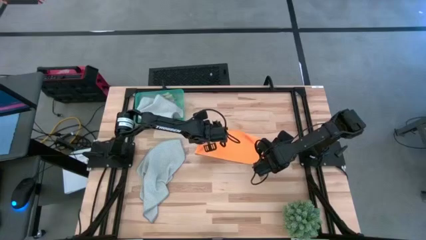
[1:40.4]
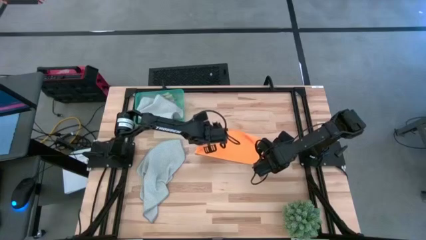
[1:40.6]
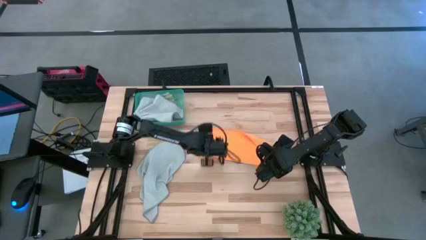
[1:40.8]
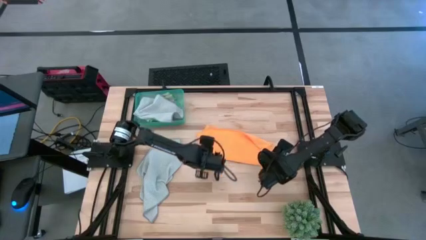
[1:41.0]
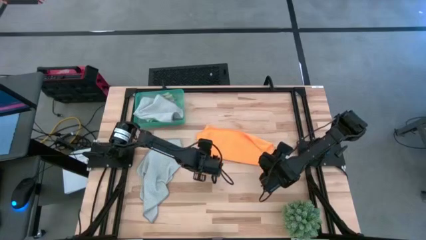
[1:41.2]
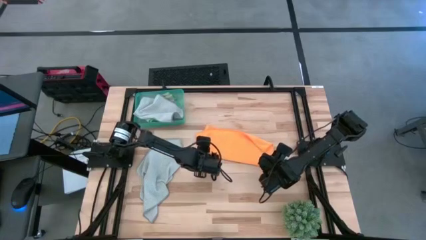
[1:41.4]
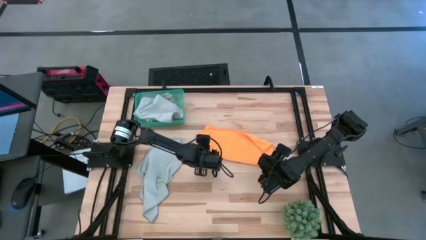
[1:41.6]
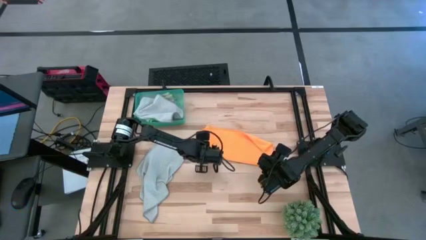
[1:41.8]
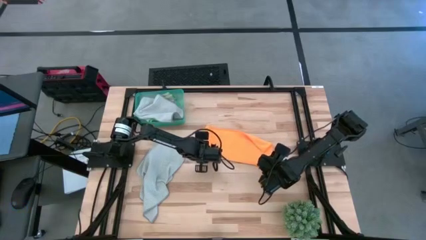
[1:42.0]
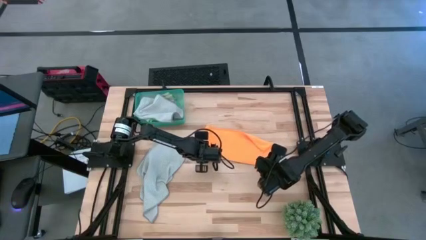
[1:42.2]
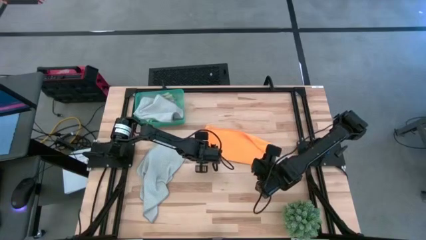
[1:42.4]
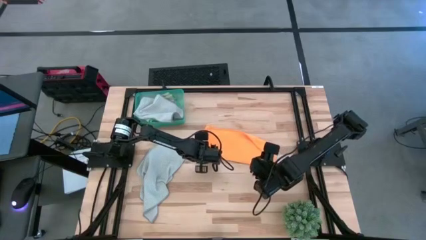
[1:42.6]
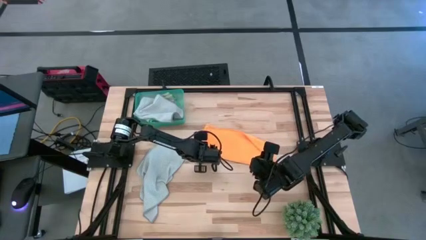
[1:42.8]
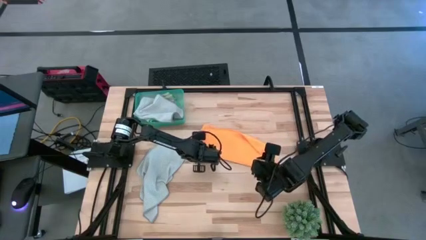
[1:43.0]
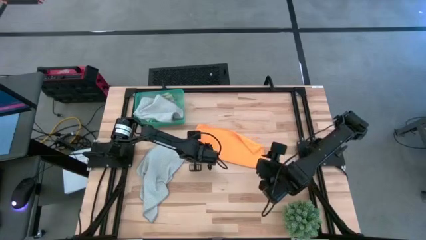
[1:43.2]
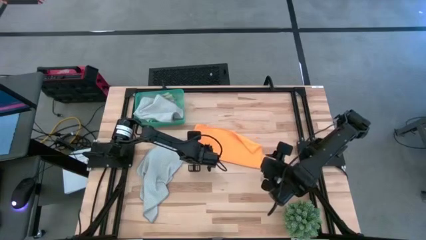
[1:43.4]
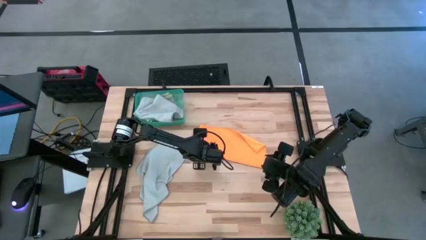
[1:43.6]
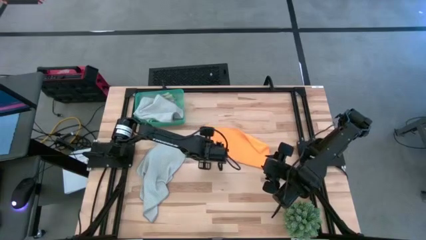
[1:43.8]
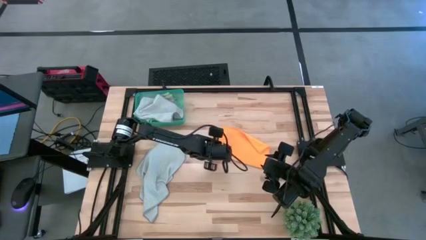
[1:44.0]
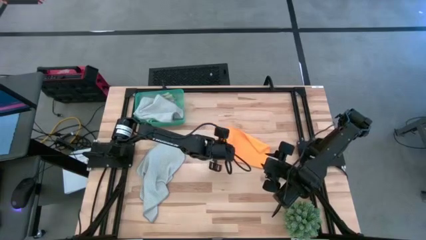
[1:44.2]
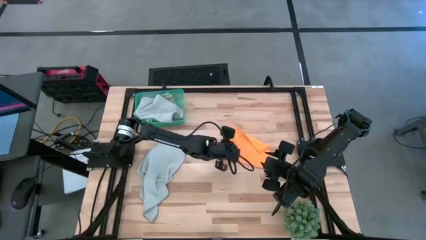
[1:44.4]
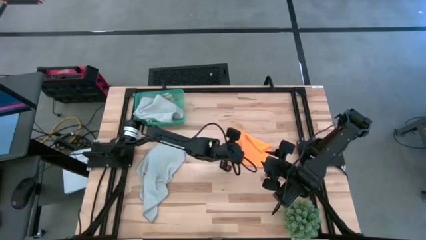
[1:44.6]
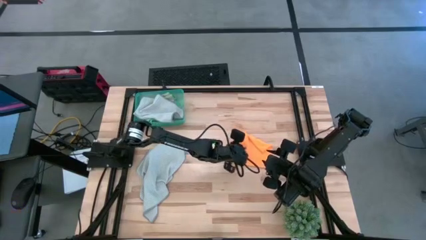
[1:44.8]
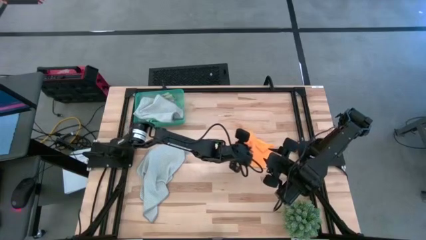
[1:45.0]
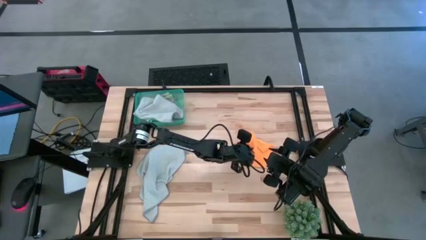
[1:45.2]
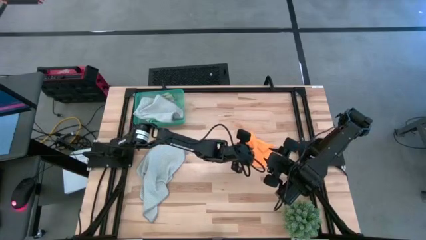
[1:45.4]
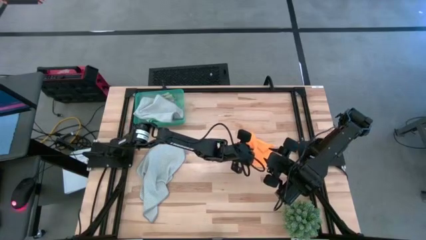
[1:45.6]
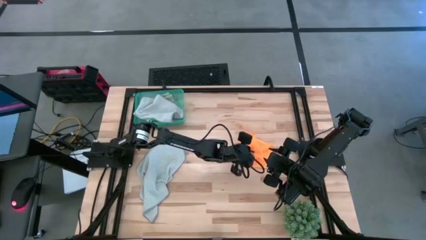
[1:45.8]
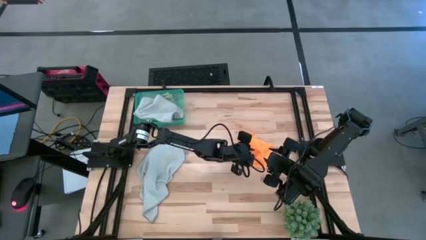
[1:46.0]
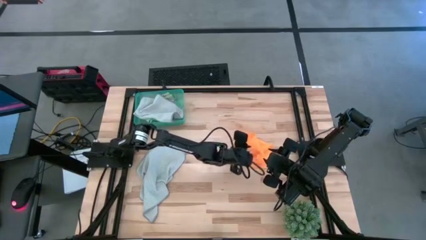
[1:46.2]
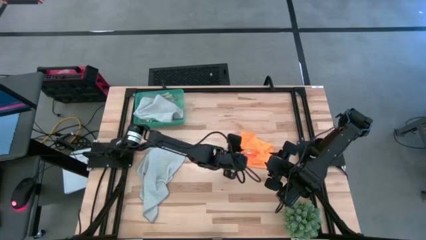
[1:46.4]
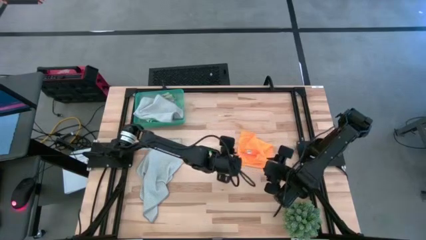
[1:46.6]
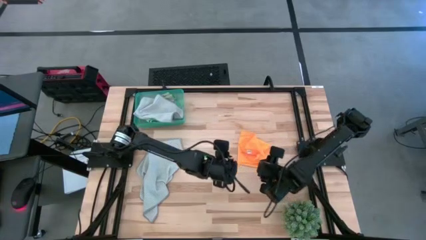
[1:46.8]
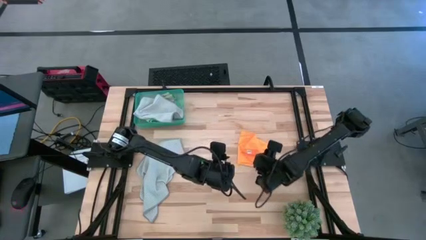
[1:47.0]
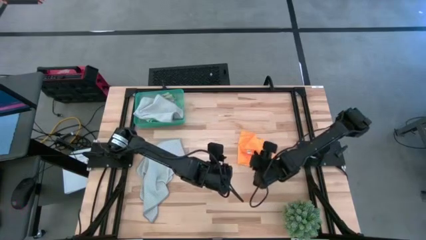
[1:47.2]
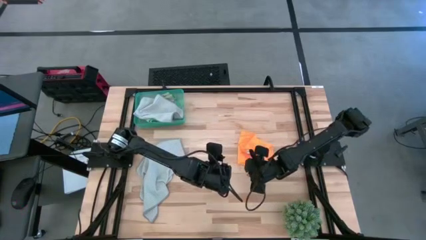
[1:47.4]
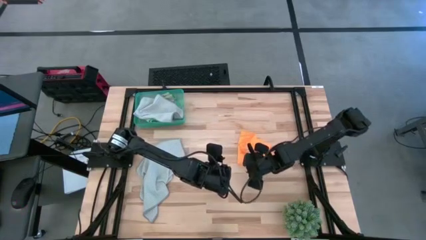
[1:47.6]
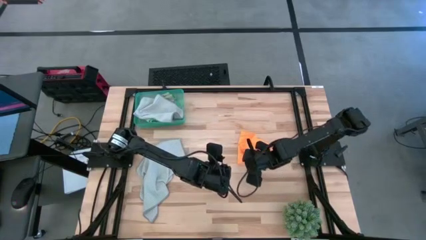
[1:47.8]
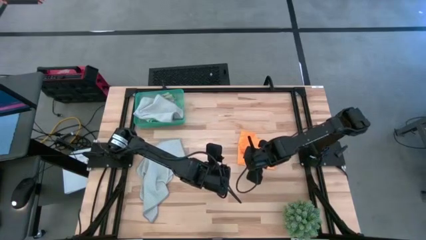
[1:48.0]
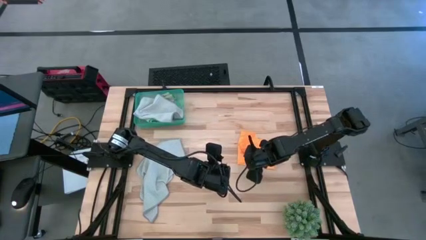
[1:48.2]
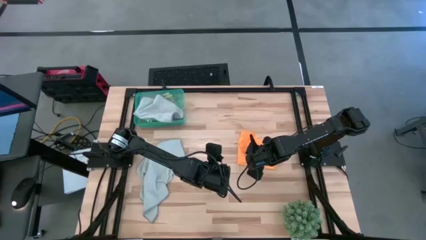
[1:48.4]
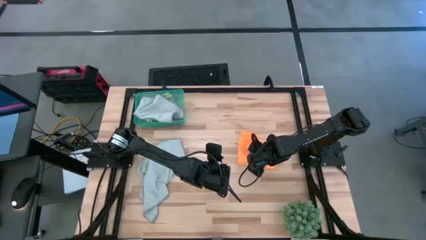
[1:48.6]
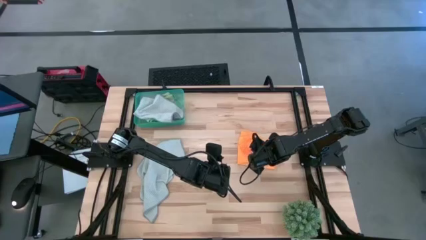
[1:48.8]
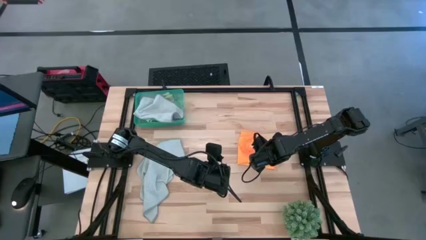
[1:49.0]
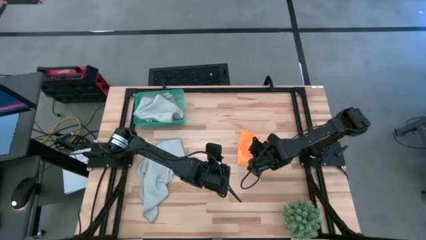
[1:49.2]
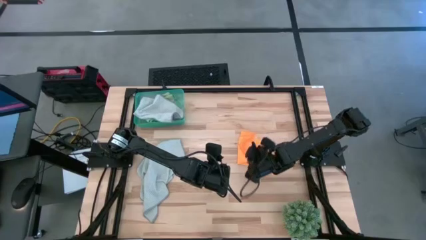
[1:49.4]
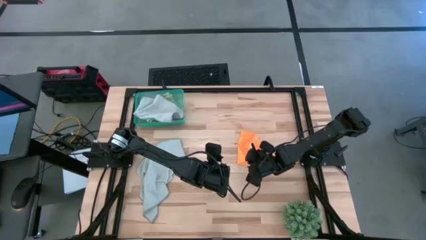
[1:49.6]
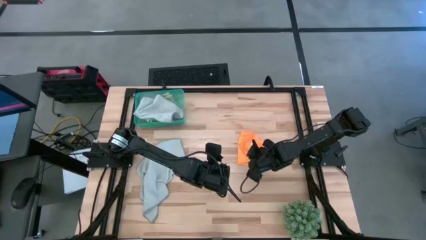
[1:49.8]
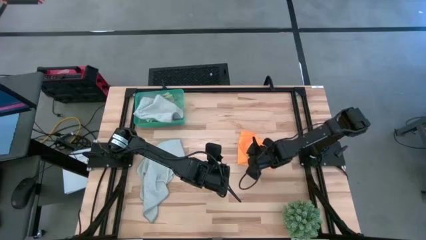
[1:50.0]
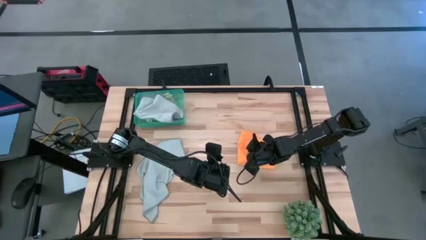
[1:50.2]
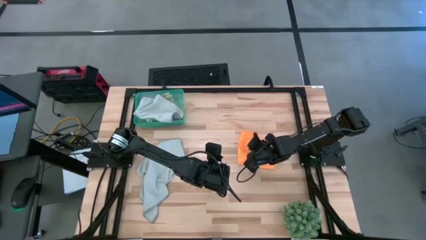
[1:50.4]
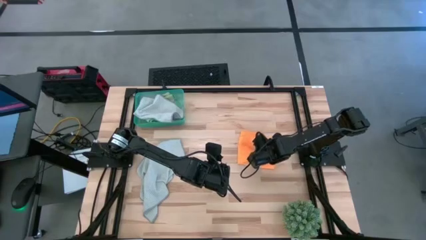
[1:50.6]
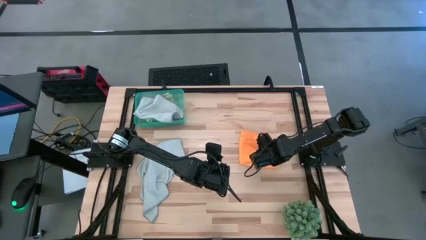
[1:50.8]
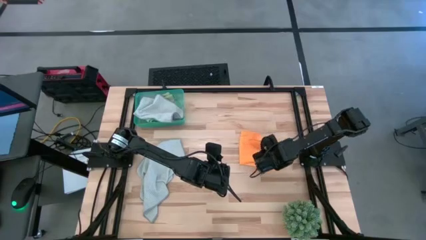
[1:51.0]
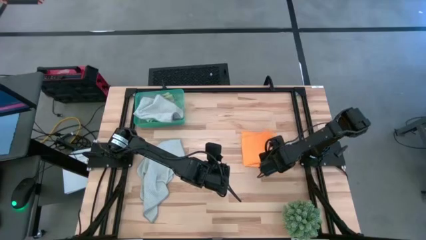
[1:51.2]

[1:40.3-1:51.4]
Task: Fold microfiber towels
Fold the orange towel

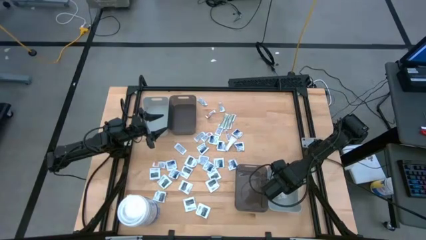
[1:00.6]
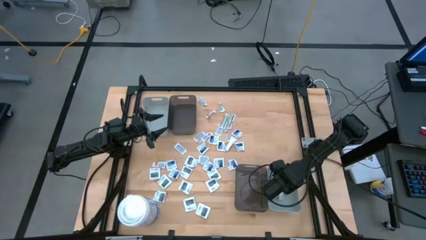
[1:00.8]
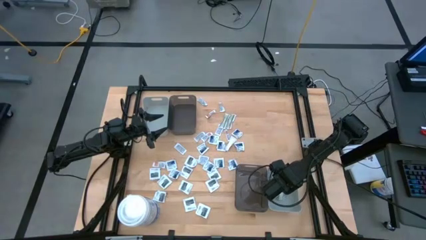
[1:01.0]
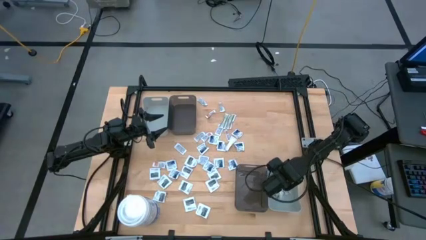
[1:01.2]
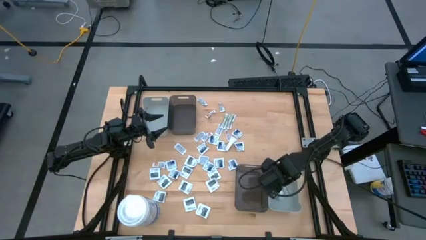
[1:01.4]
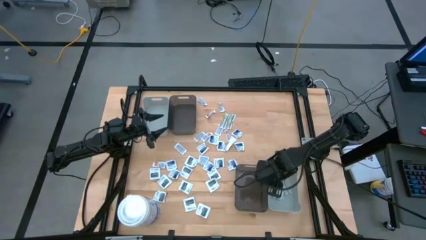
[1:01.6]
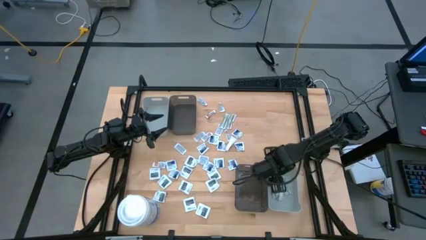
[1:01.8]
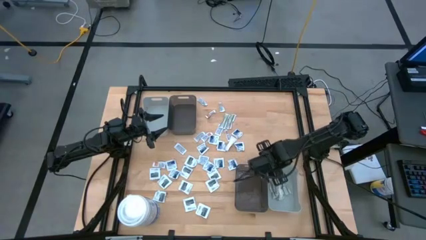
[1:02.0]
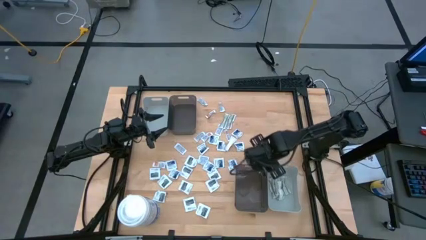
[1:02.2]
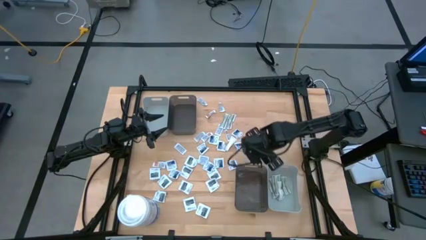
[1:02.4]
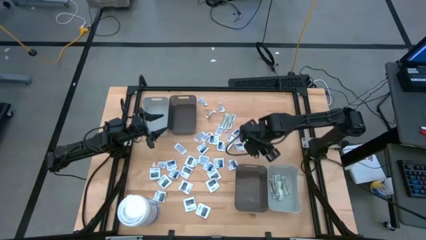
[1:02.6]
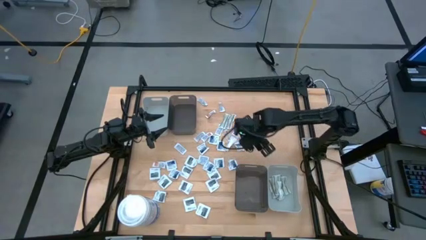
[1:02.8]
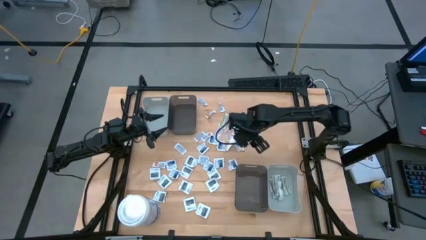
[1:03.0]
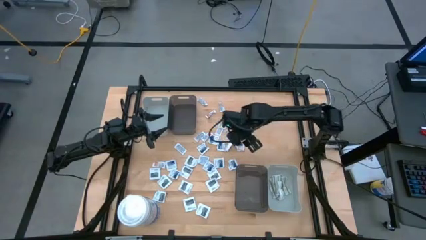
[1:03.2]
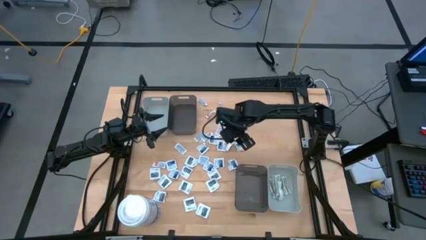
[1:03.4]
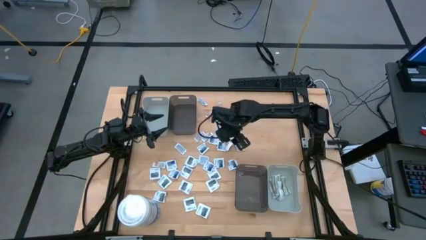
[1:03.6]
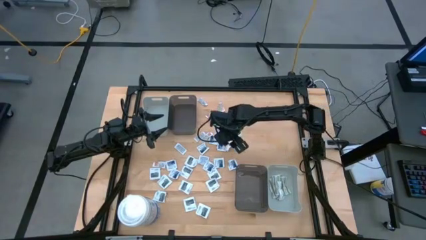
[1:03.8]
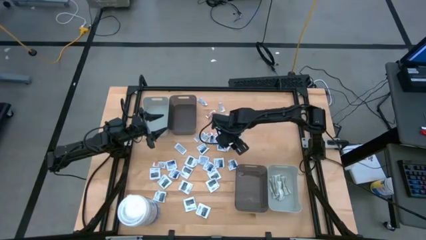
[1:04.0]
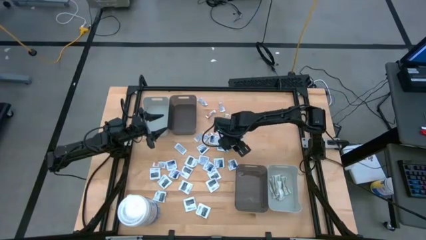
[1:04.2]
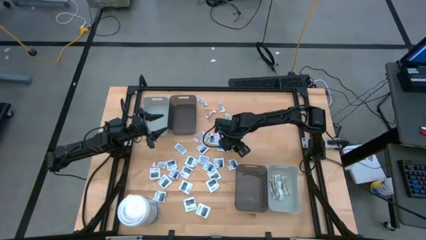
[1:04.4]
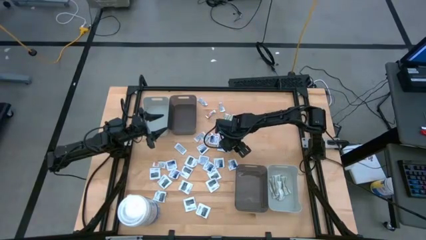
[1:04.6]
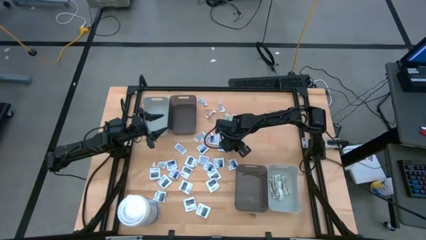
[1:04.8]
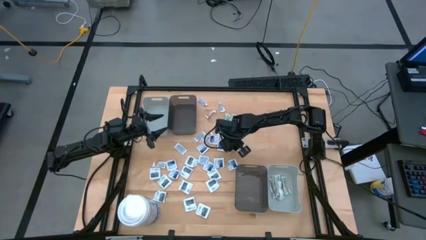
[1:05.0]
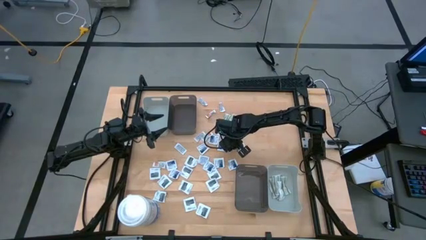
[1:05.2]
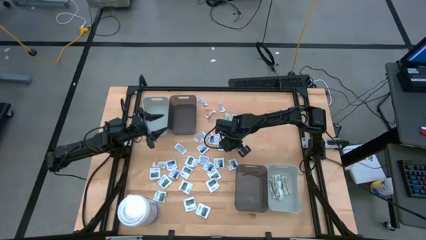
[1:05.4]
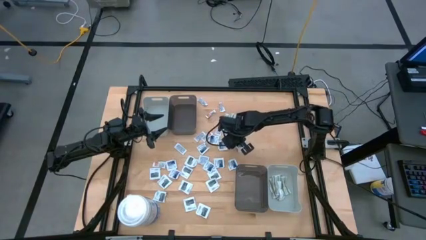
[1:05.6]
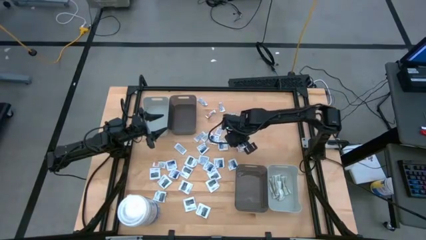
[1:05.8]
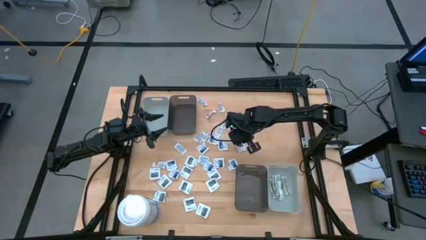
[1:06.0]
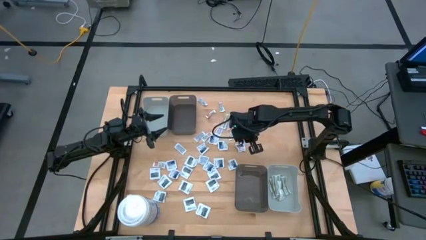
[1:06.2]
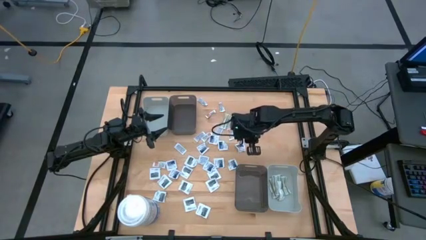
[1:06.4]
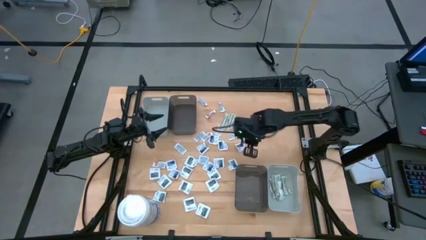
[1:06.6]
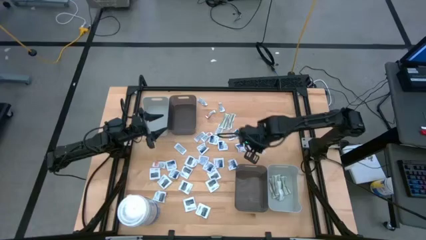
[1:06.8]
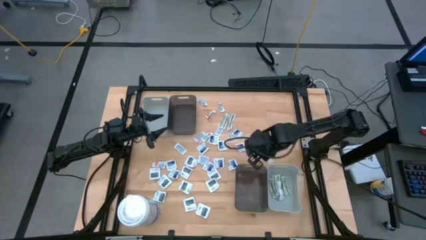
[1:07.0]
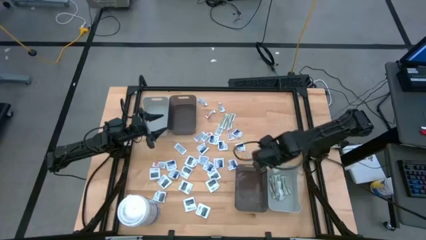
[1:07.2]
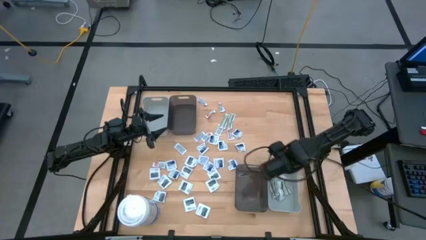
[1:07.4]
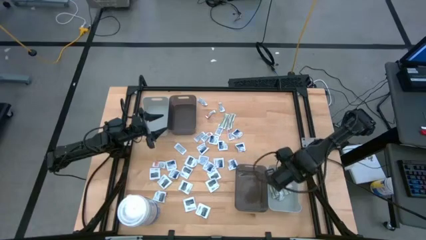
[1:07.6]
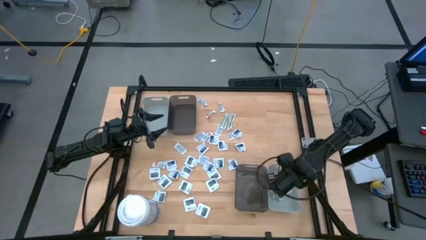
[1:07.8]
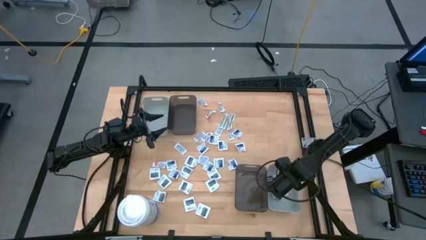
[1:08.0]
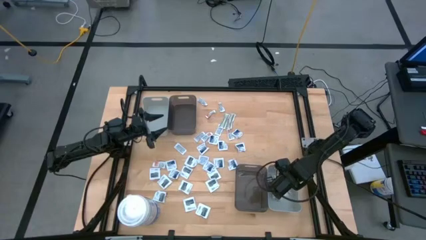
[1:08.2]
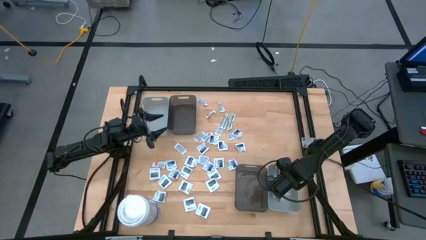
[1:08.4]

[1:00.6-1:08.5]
Task: Pick & Place First Aid Supplies
Put the white bandage pack into the bottom gray bin
